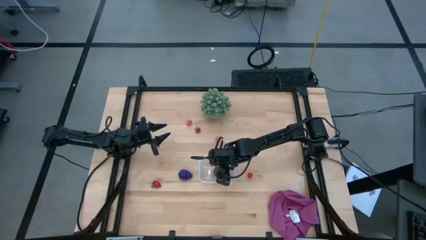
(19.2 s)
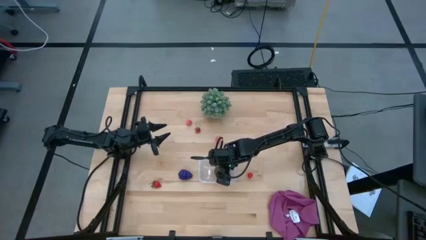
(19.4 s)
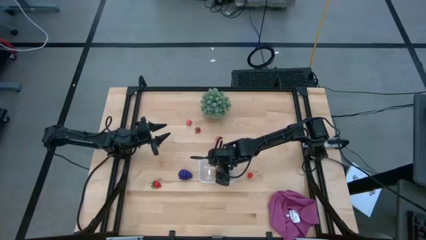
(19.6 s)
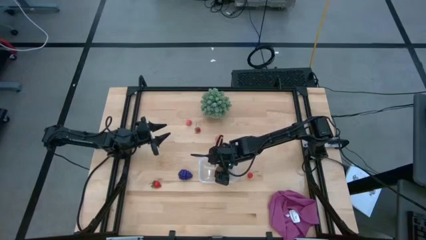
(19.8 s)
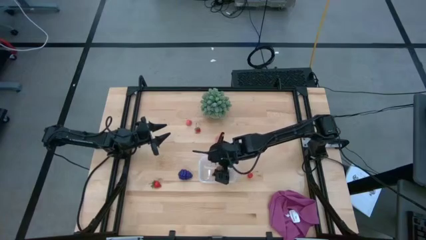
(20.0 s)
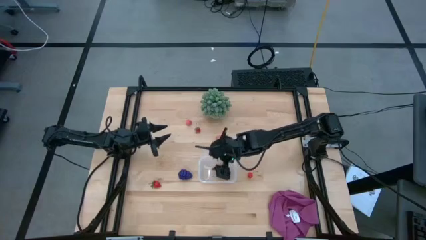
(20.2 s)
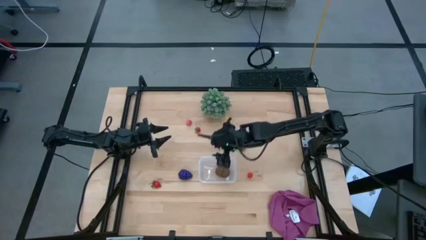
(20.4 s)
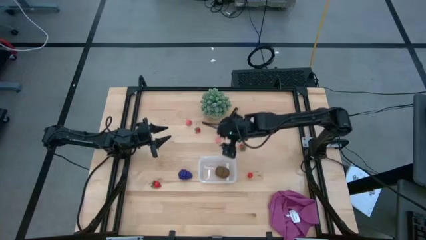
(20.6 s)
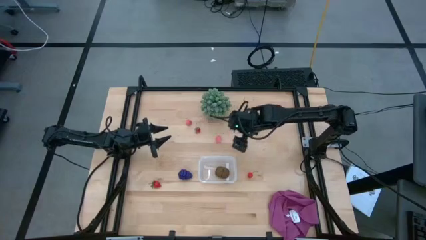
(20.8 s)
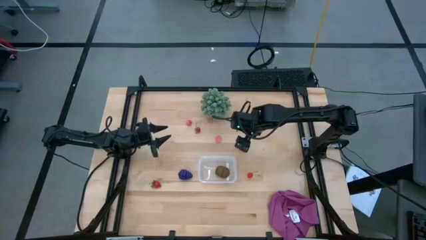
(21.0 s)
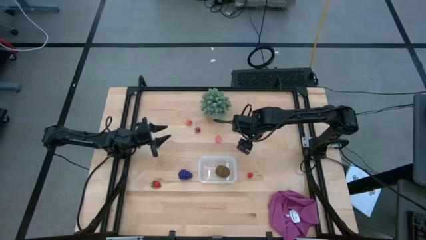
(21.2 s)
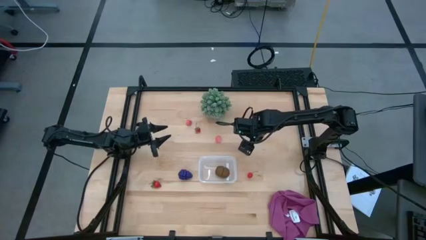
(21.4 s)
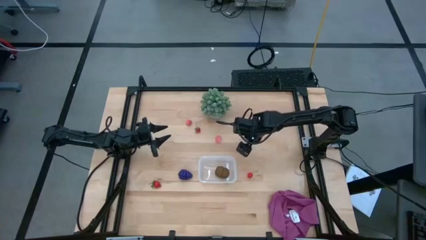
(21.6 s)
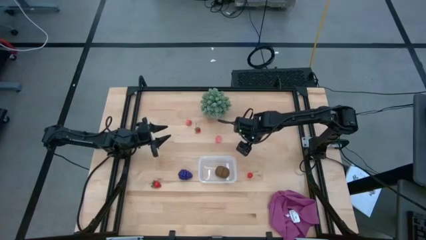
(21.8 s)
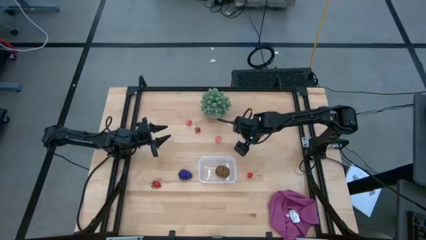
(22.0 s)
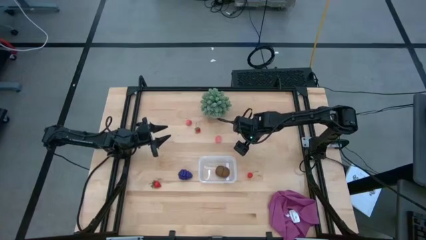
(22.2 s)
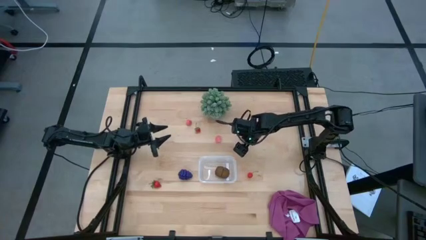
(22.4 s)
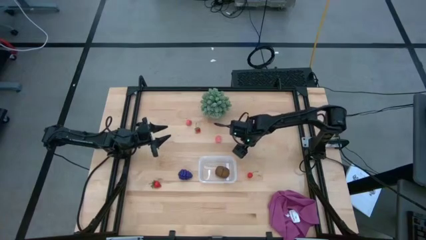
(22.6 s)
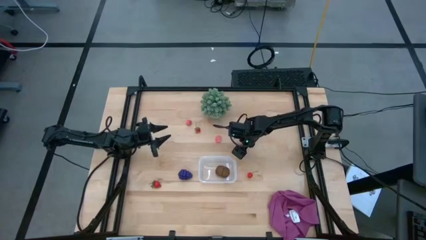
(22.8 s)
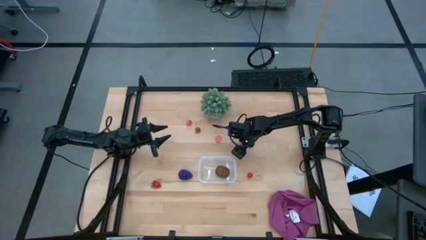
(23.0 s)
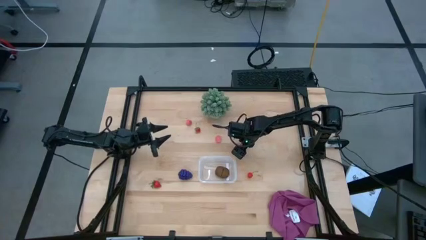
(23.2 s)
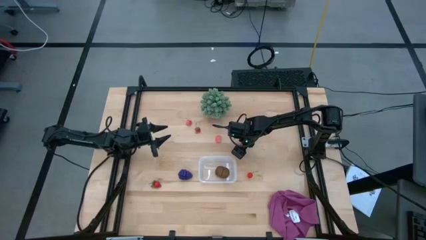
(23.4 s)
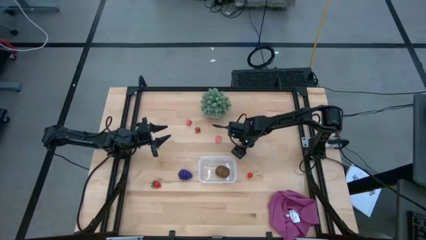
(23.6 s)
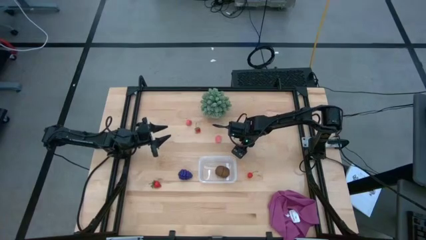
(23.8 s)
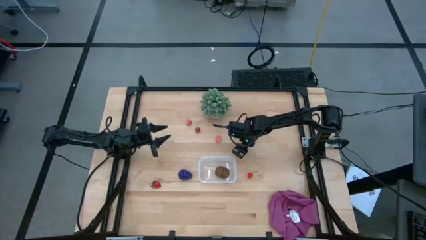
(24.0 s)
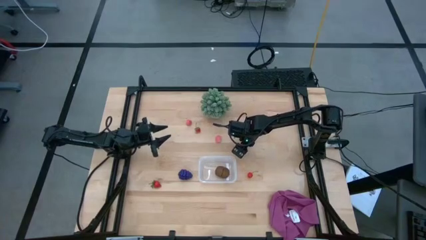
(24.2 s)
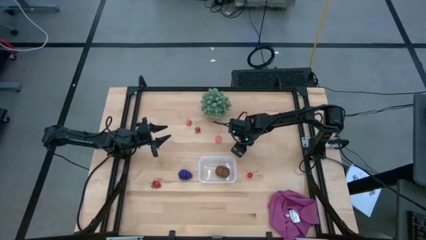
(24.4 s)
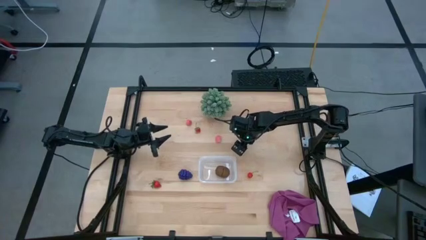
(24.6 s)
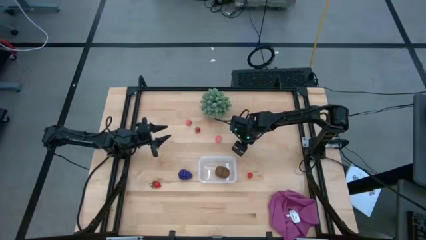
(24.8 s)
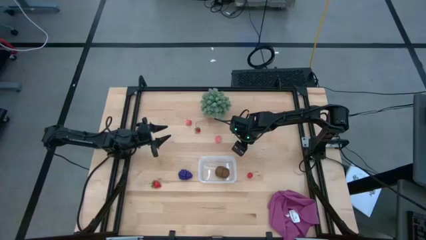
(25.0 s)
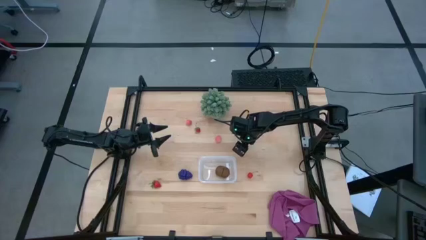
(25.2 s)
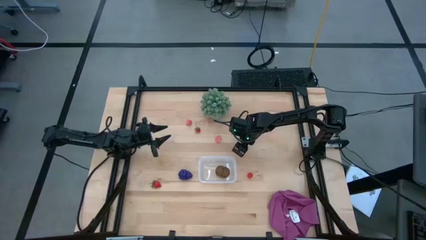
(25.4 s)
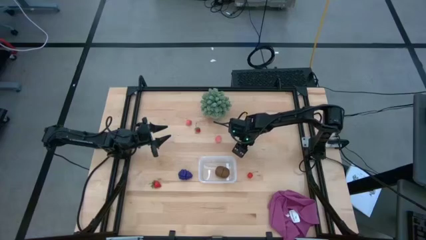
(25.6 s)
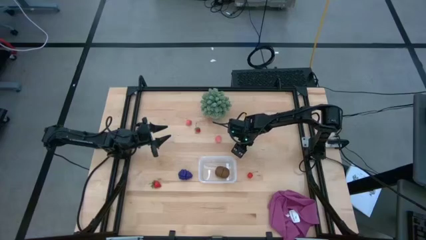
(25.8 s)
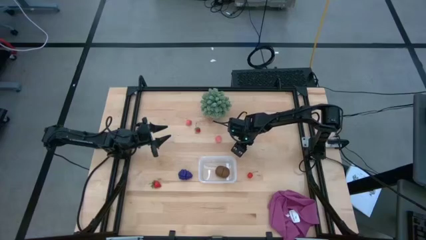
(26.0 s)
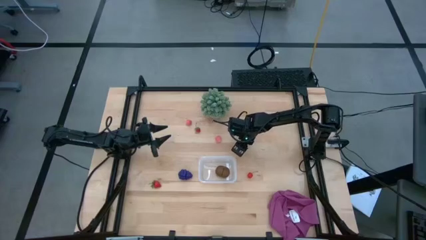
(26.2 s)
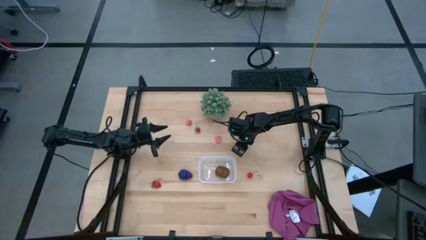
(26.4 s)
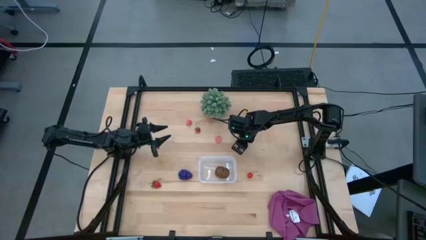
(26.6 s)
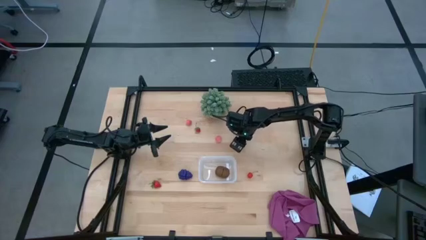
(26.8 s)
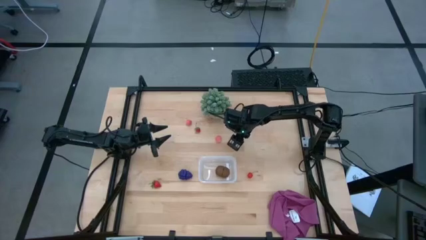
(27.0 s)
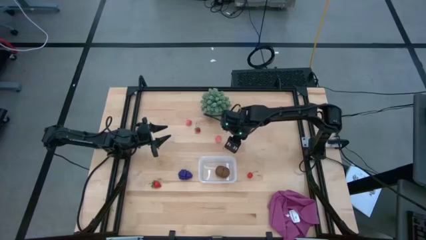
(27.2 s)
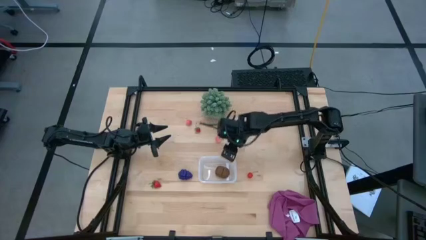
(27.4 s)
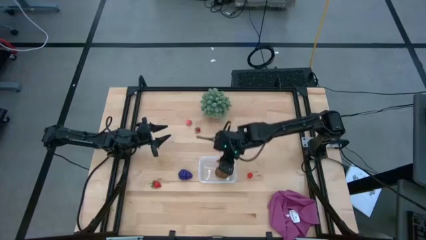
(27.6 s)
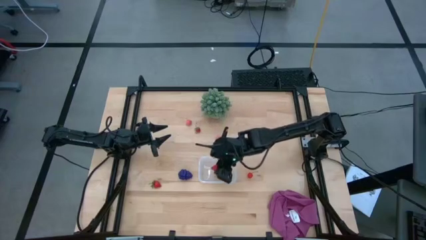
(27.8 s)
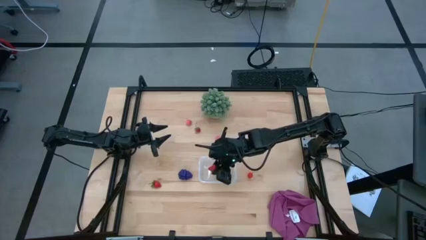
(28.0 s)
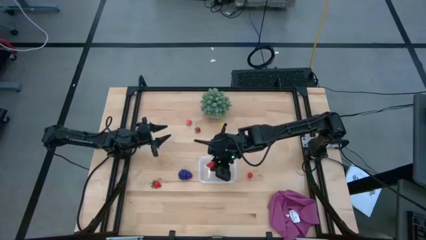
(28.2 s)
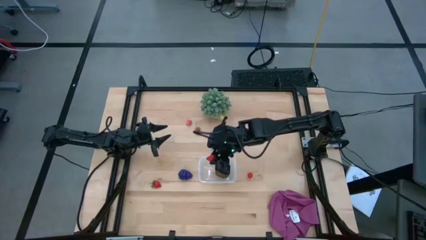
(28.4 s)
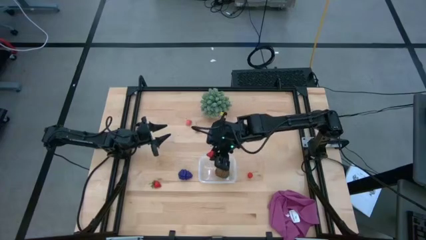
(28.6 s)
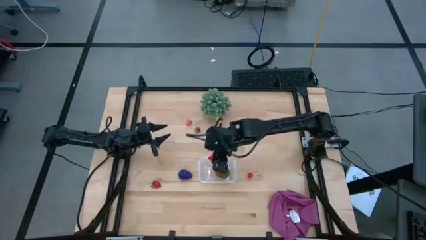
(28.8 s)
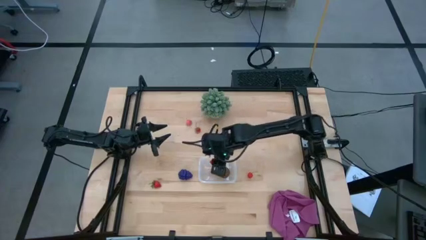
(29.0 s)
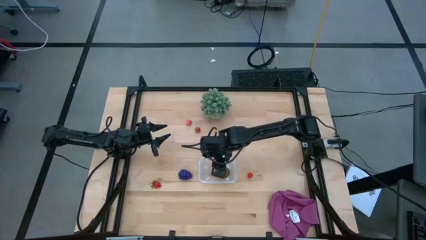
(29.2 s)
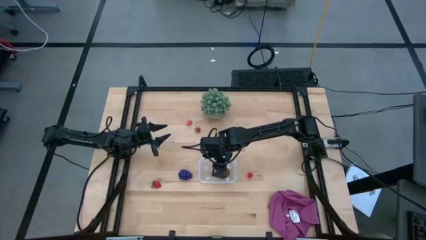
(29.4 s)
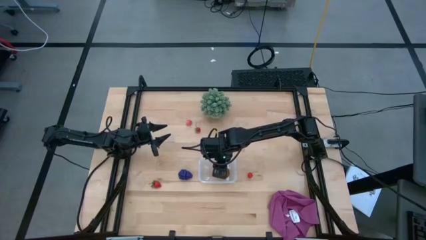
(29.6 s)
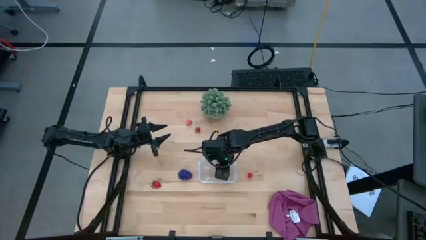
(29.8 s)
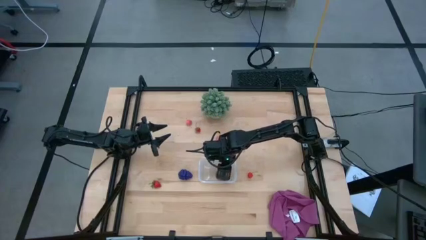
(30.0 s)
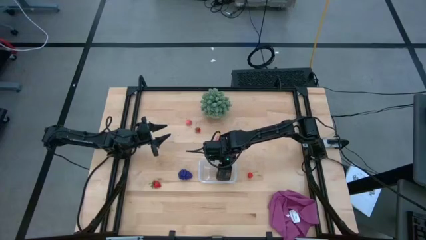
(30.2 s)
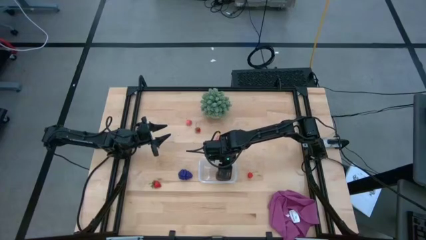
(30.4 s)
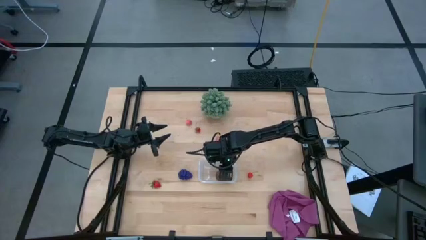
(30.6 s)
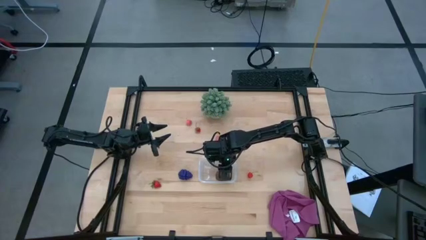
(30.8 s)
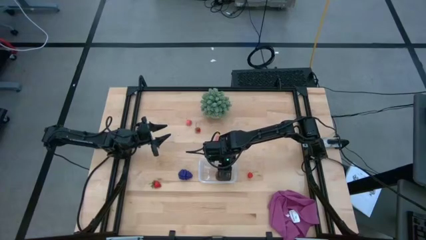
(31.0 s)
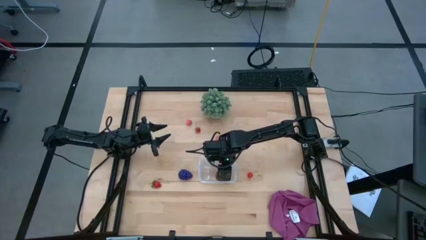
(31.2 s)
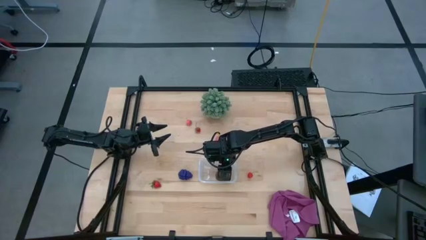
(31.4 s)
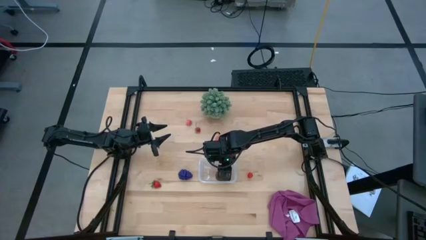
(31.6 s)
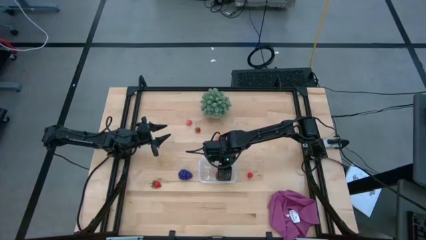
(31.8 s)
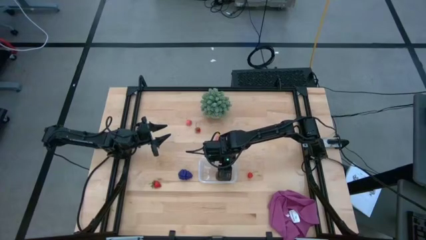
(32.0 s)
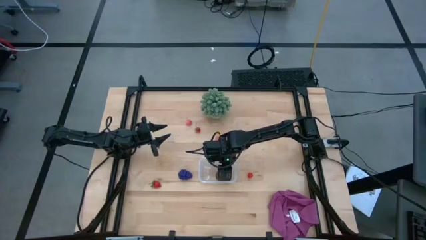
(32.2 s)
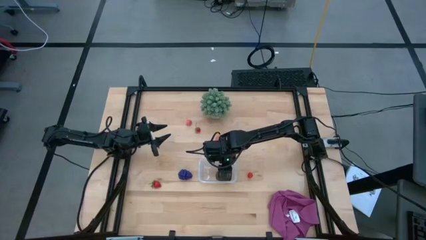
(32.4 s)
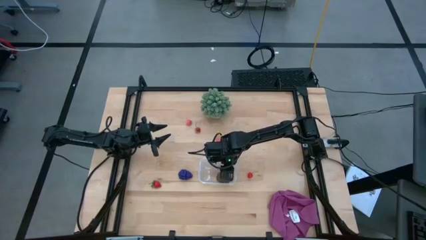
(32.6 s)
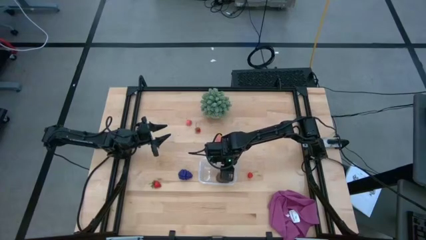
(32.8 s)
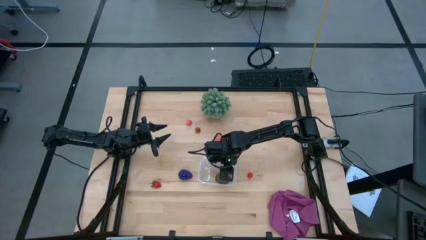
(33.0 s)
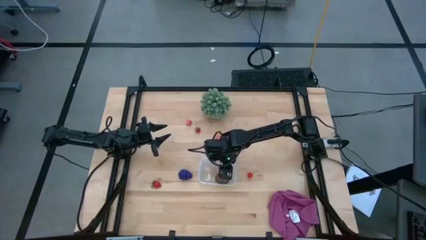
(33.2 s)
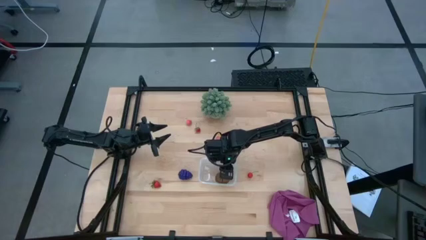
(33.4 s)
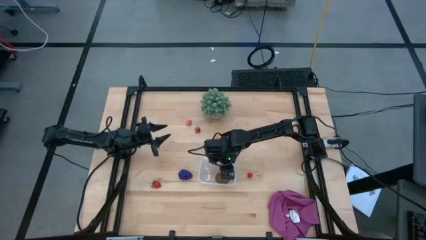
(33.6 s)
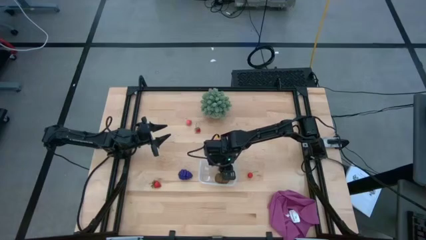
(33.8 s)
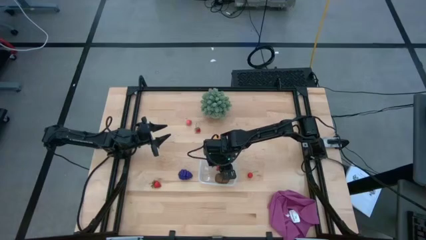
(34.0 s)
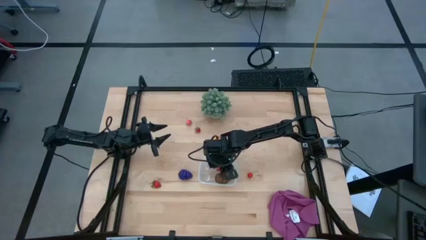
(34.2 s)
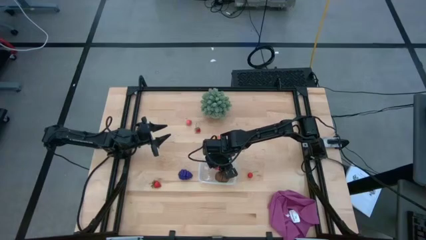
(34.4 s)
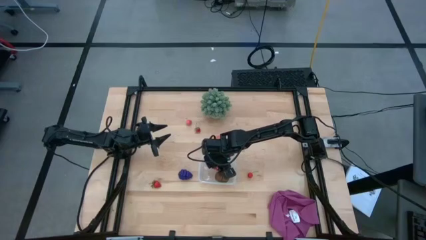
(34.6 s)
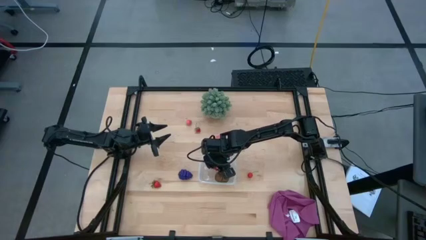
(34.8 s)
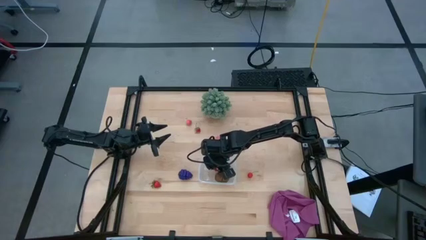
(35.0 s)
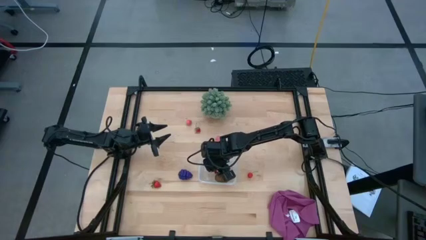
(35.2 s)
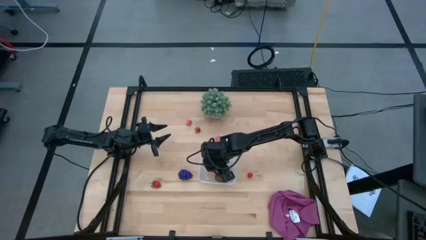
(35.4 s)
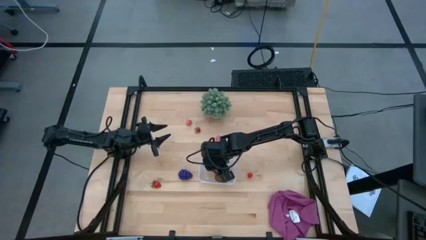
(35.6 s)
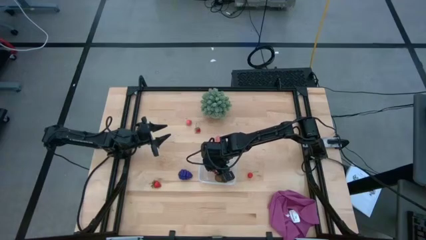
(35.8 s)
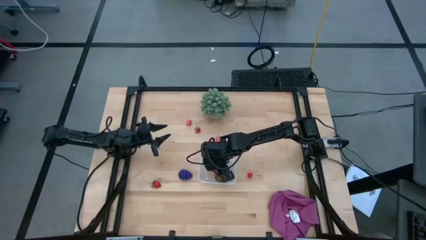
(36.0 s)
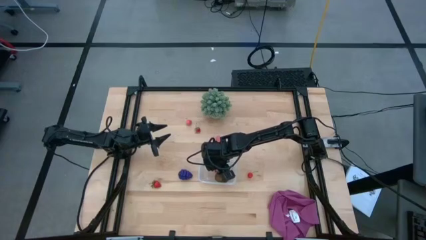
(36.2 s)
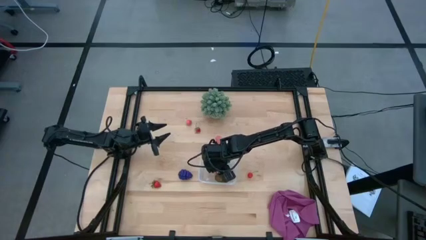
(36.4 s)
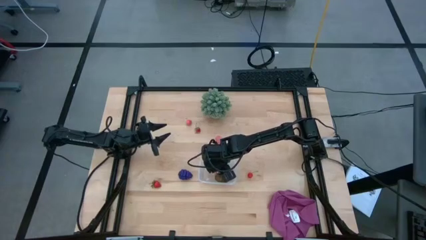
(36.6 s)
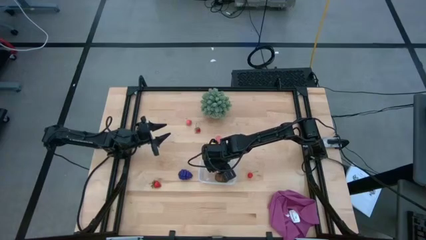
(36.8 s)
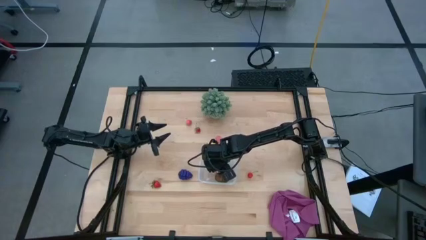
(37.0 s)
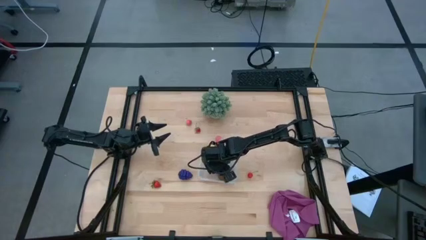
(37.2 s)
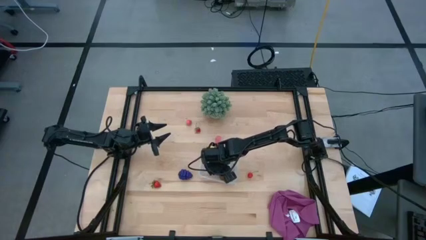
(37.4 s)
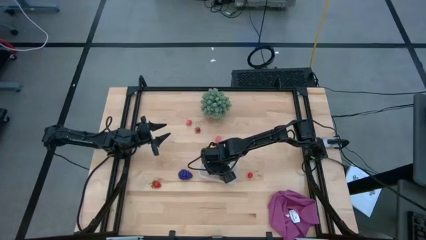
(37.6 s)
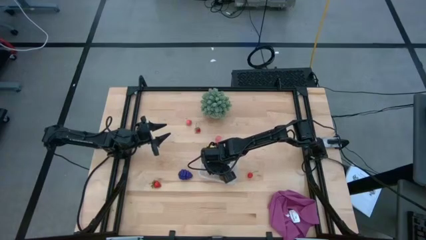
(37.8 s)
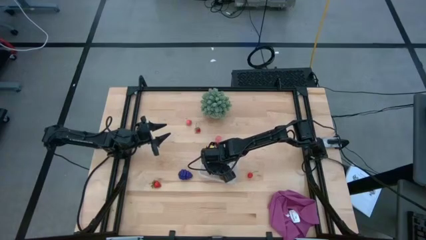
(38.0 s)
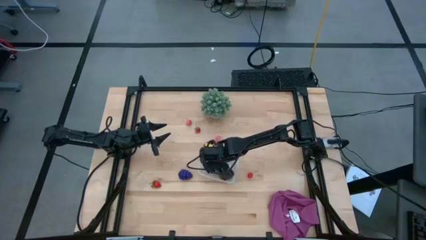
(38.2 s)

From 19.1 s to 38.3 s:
Task: Pick and placing Produce into tupperware
Put the right red strawberry into the transparent bin
